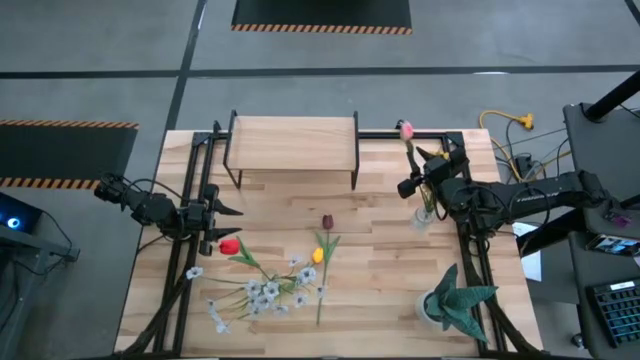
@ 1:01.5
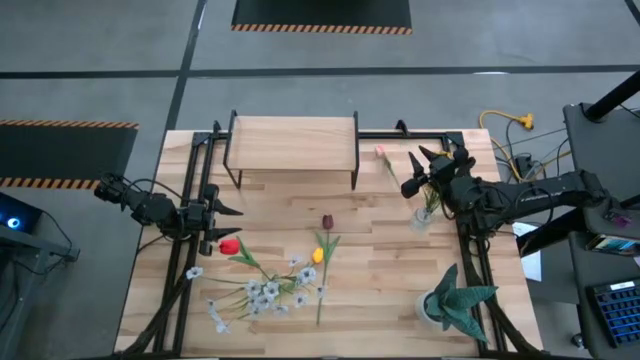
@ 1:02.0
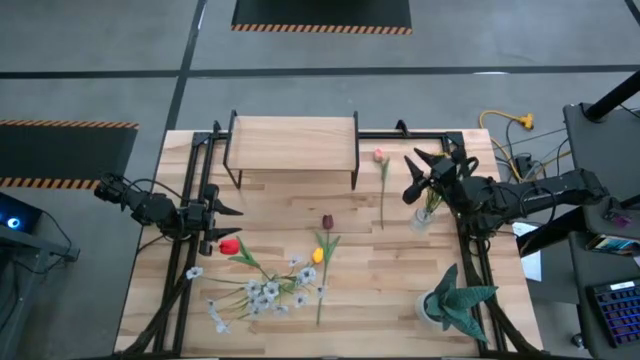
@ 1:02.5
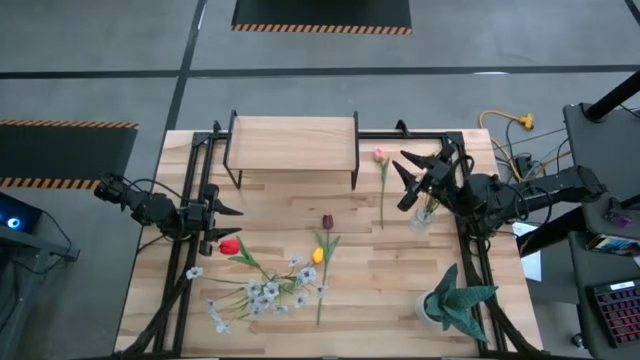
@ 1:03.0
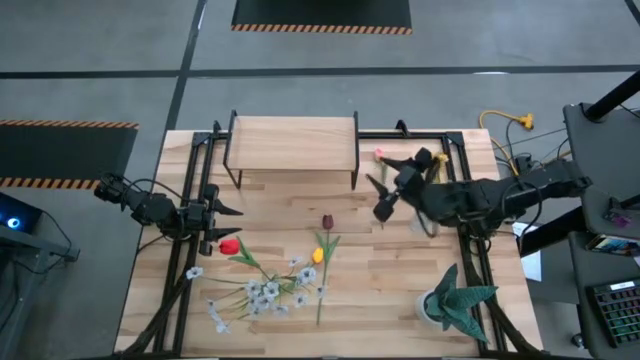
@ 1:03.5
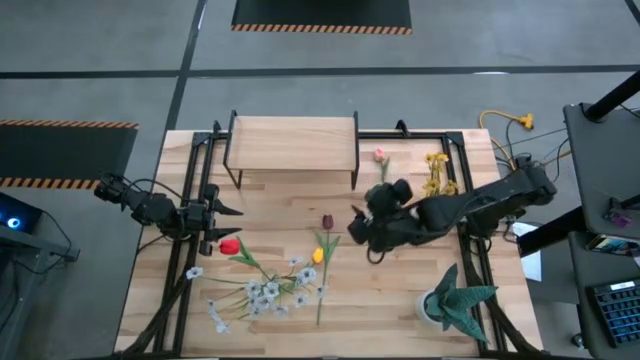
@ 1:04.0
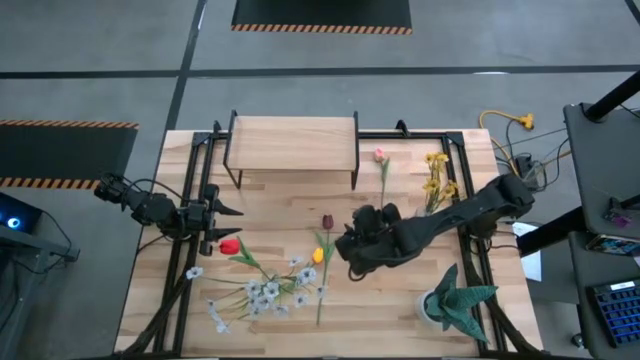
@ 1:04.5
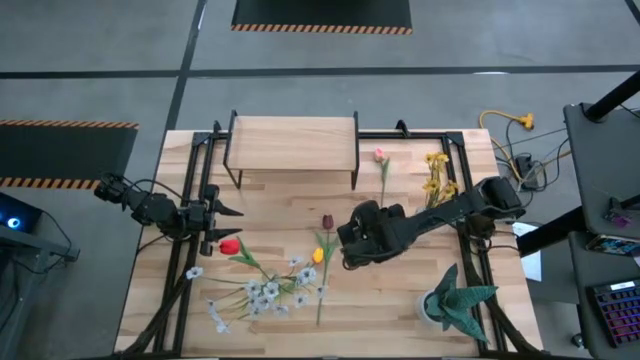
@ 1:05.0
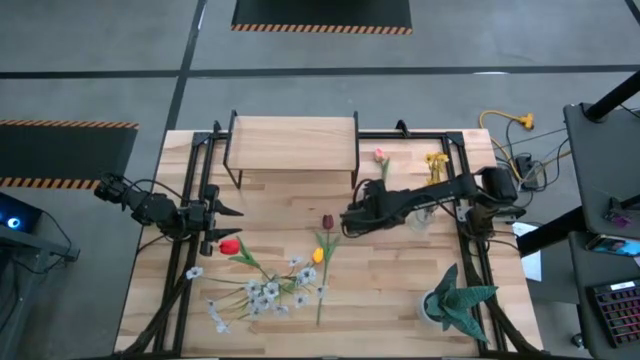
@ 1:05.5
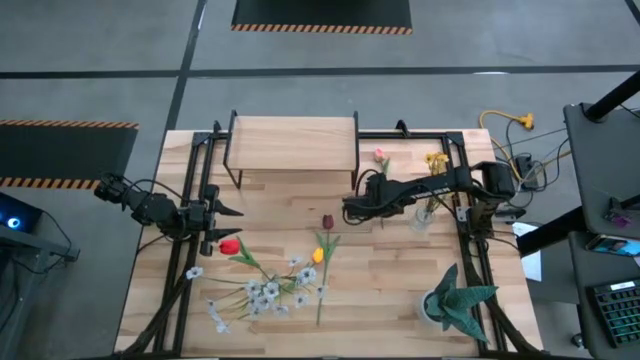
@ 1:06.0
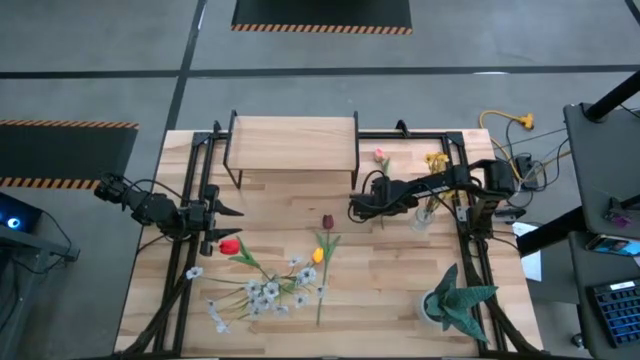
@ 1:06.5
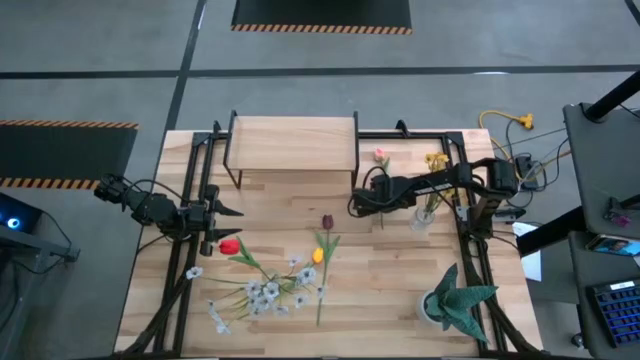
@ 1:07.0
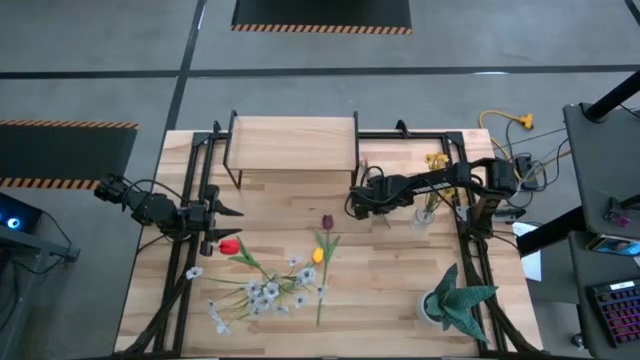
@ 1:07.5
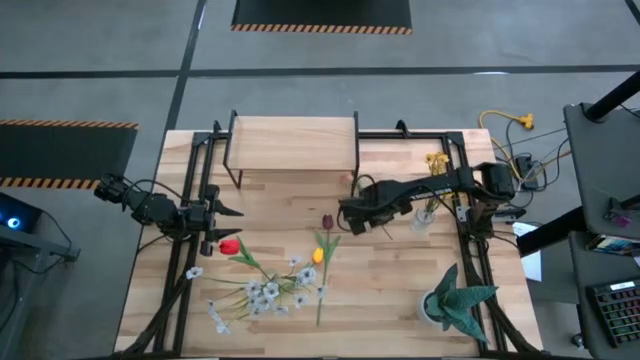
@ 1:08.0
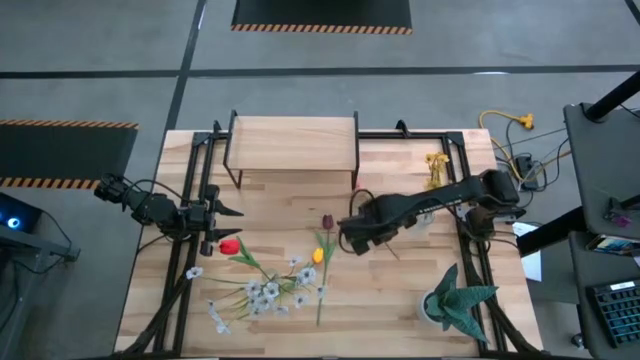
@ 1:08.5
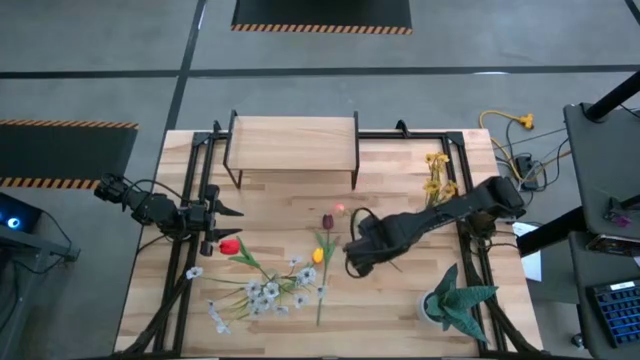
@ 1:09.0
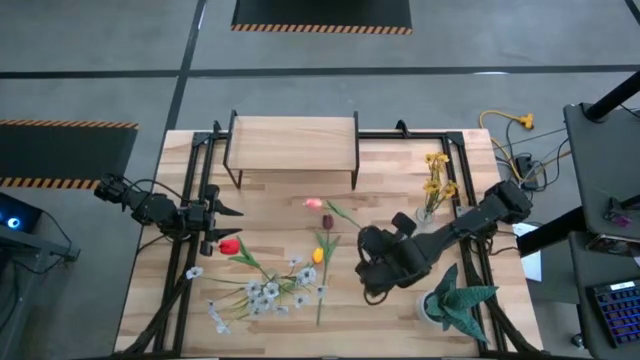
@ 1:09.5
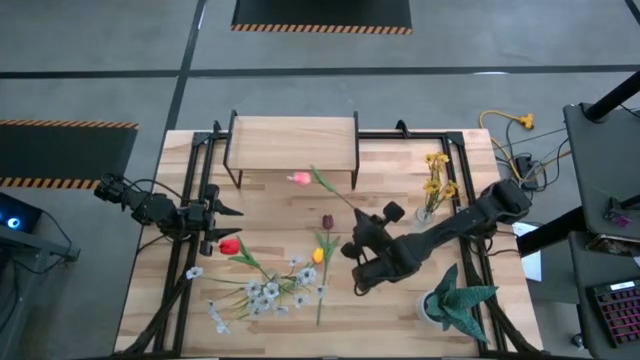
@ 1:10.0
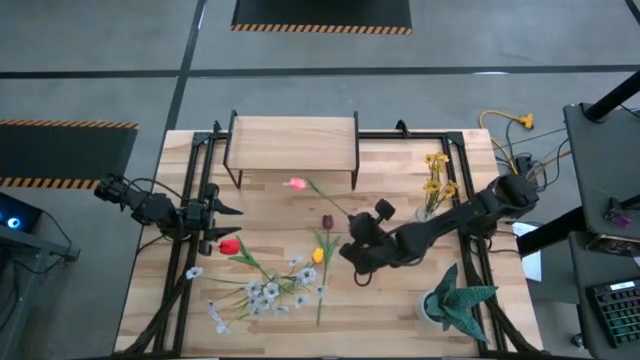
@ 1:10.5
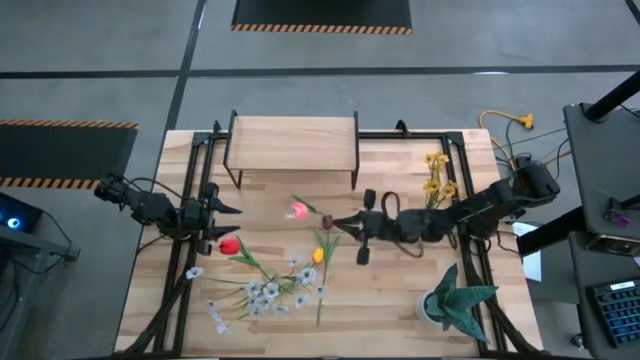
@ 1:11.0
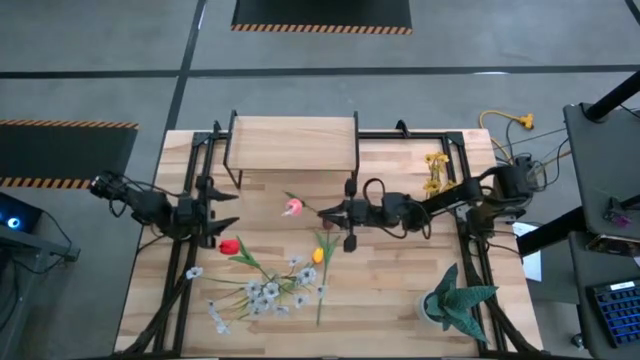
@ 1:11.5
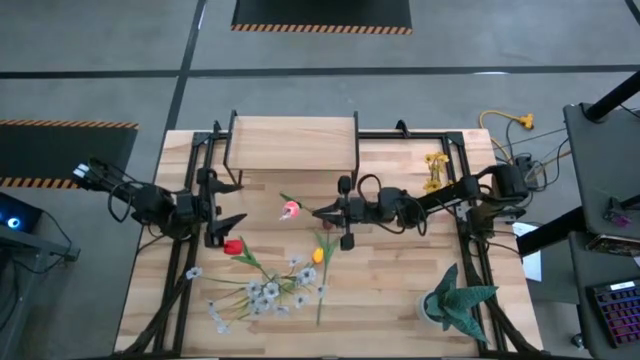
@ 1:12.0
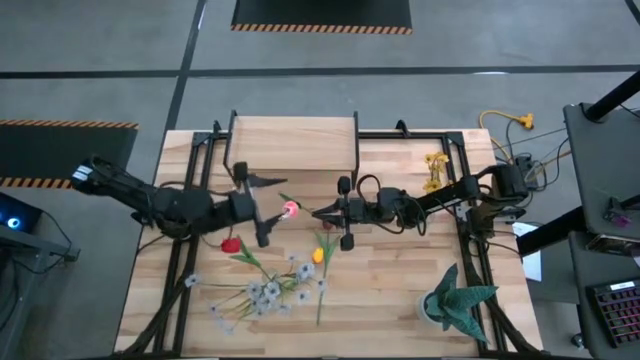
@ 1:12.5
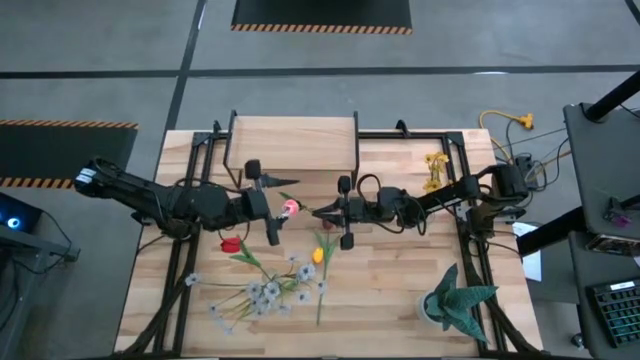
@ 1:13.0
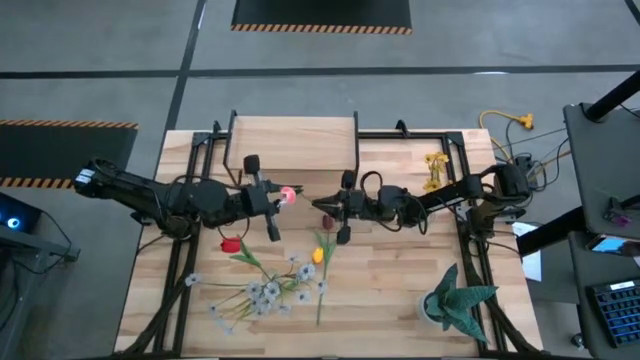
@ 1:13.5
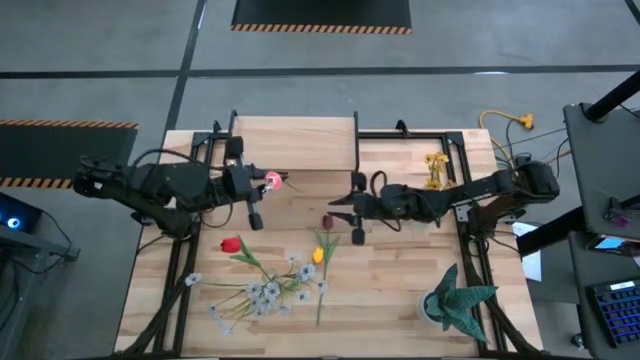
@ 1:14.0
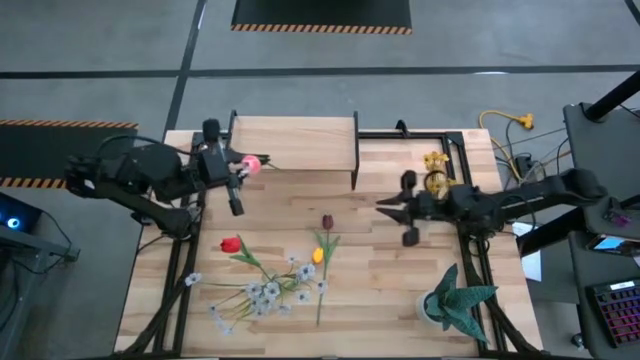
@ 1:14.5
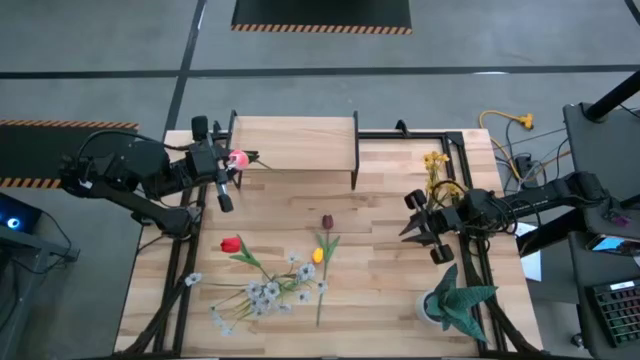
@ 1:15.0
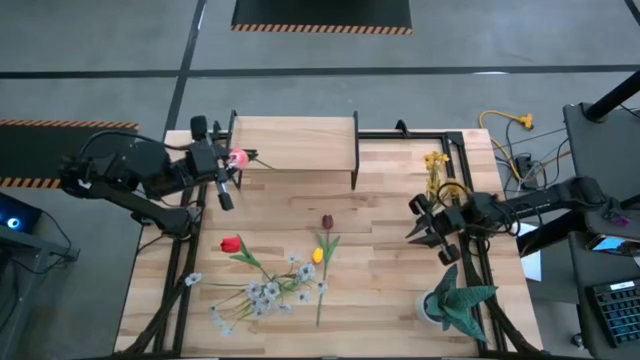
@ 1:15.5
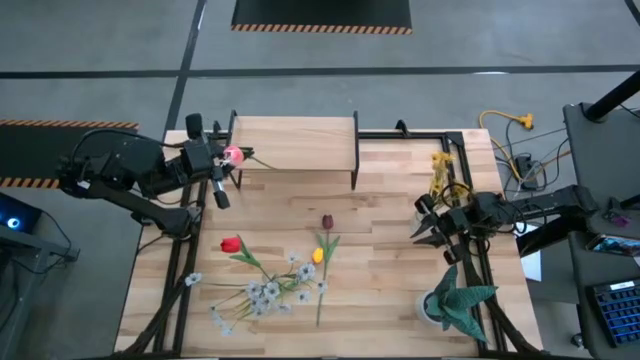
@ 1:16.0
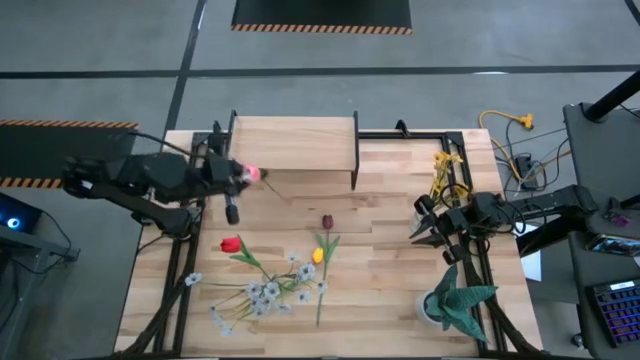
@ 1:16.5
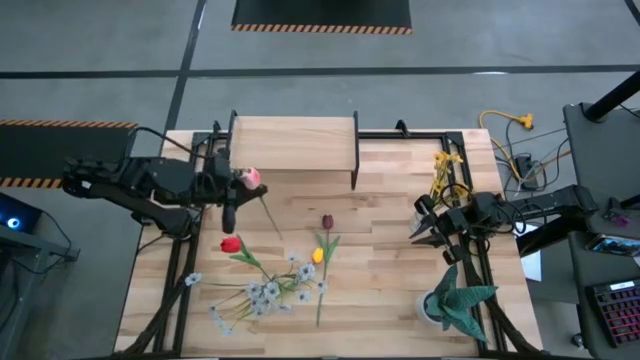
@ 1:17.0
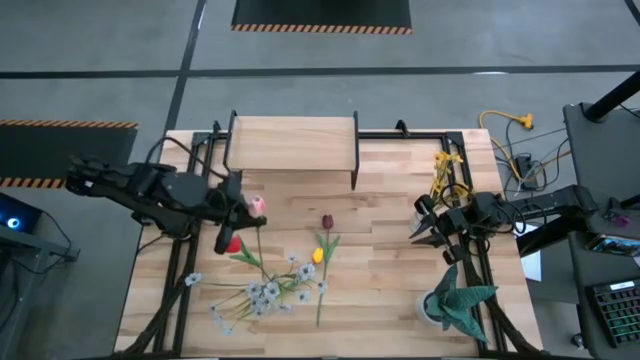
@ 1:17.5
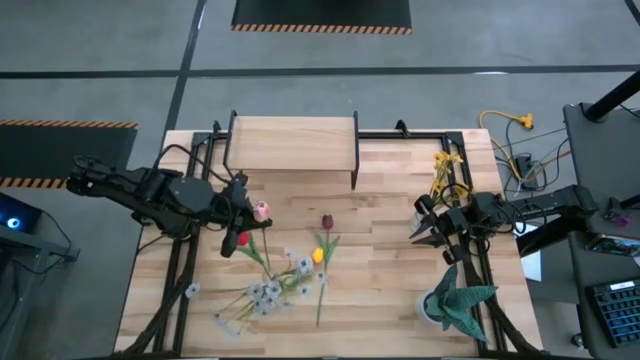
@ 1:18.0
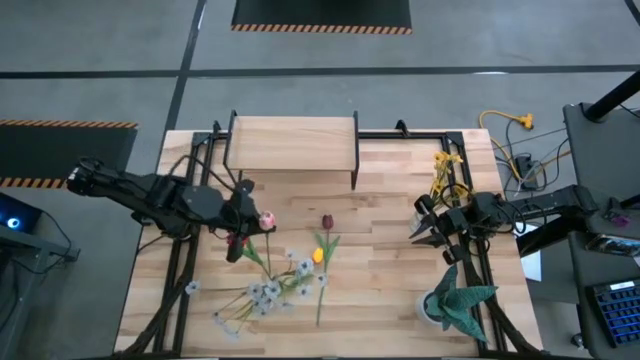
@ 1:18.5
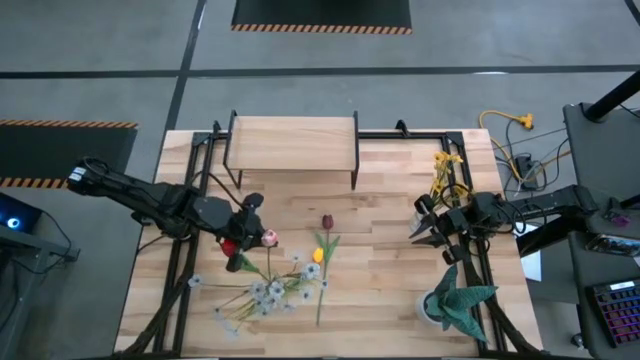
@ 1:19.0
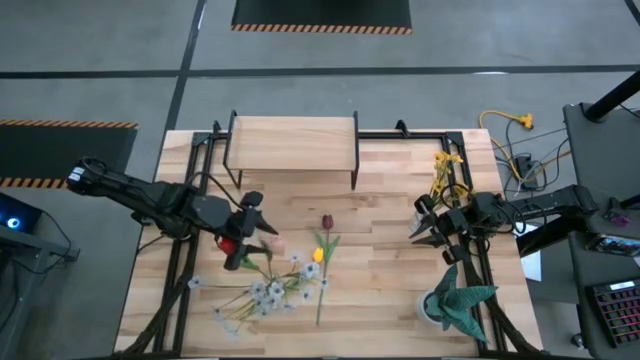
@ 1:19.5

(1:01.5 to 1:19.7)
Task: Pick and place flowers into a vace then onto a shelf
Put the pink flower into the left transparent vase

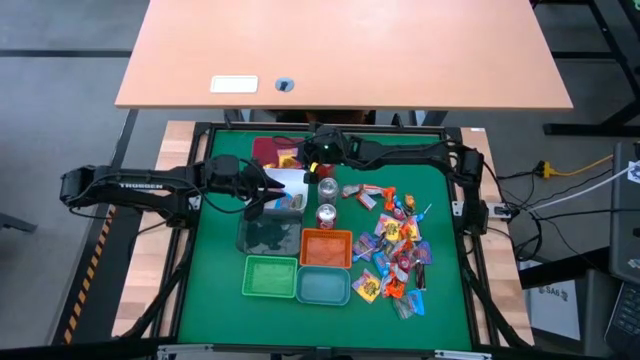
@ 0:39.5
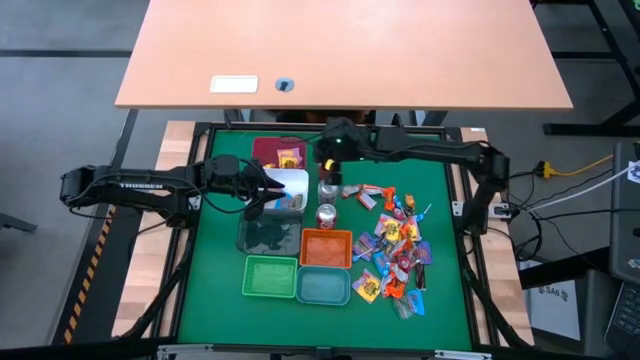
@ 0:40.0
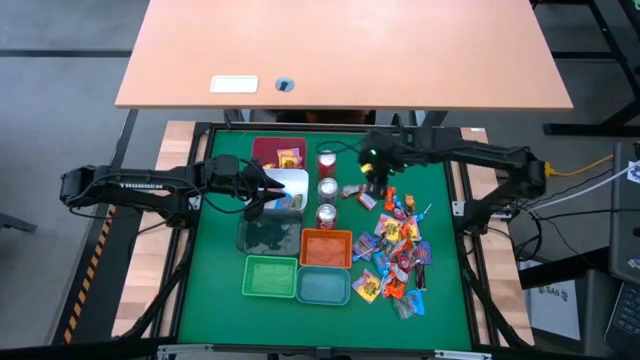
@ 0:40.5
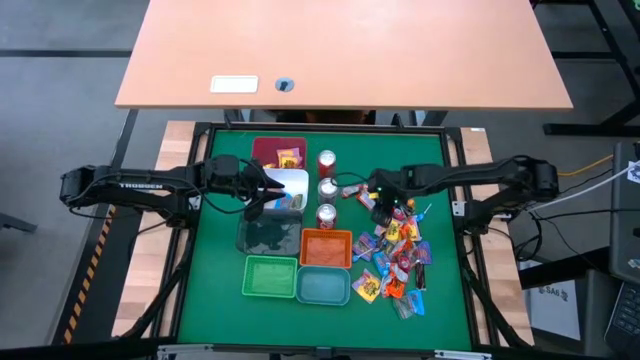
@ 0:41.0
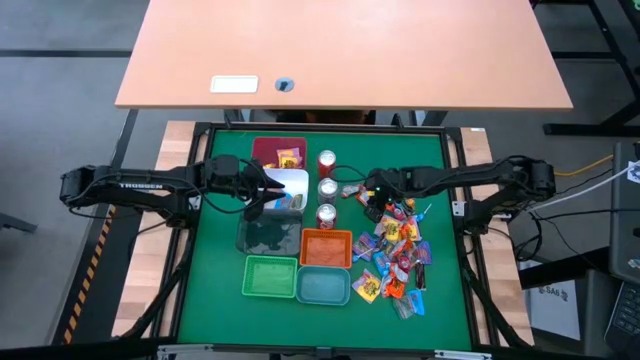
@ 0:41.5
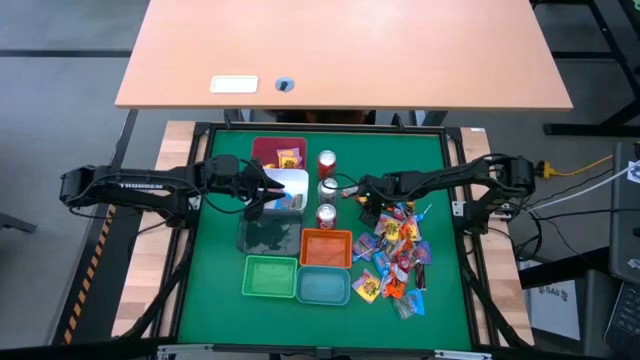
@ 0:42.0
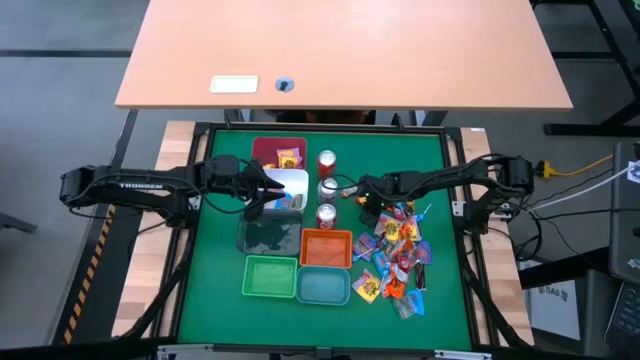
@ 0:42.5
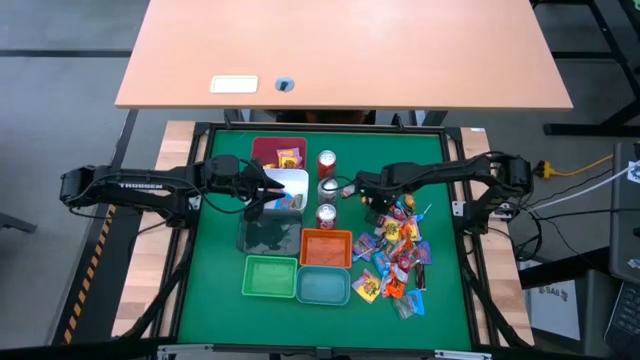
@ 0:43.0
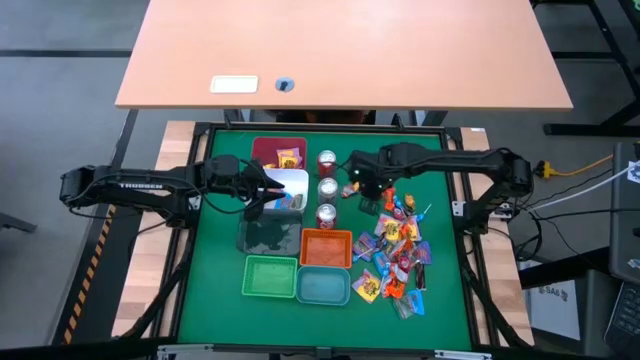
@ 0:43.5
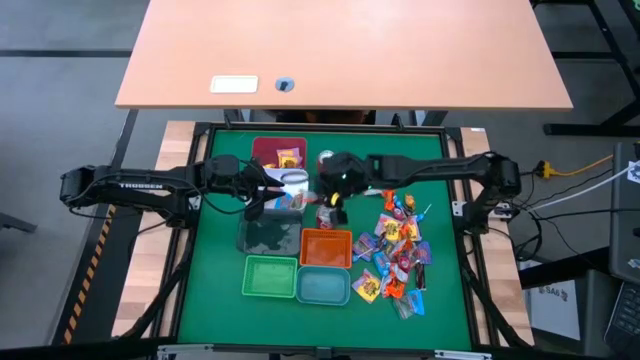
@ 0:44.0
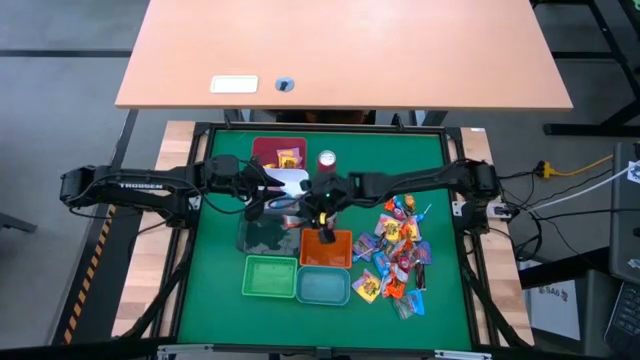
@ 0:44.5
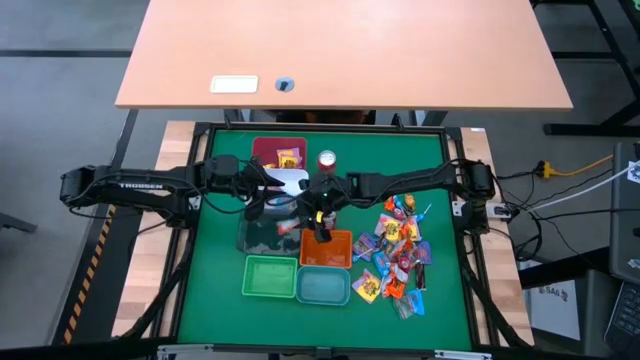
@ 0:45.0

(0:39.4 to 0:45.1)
Task: Sort candy
Put the orange chocolate into the black bin
